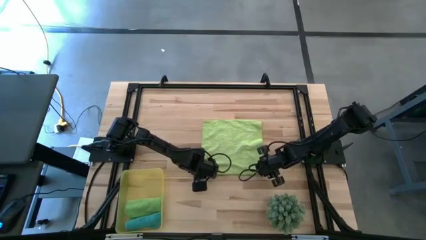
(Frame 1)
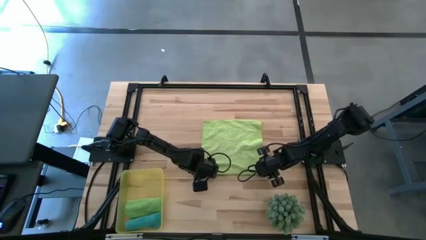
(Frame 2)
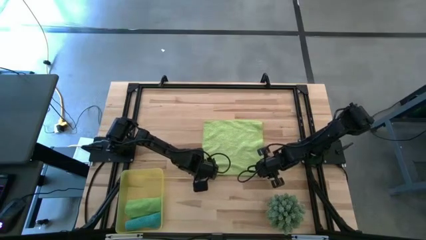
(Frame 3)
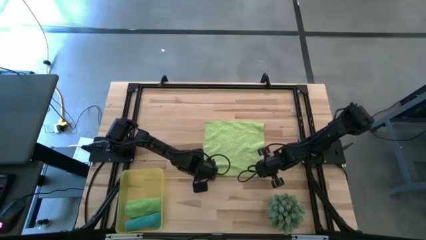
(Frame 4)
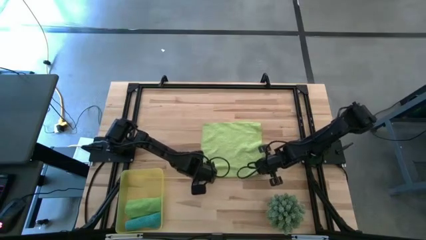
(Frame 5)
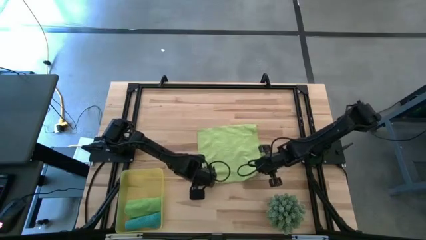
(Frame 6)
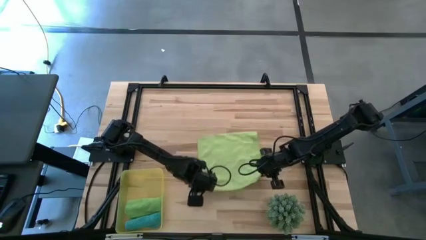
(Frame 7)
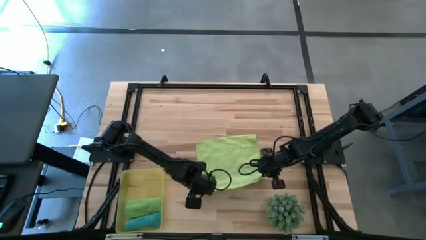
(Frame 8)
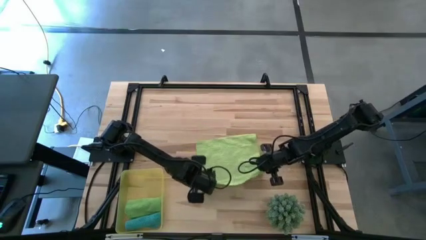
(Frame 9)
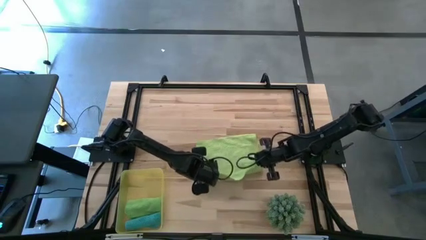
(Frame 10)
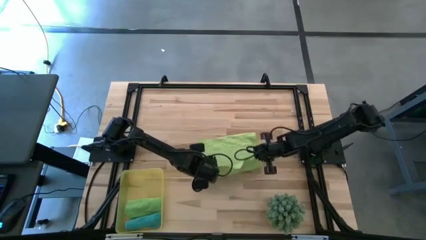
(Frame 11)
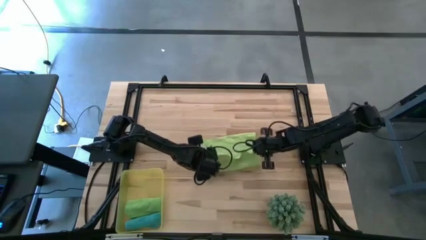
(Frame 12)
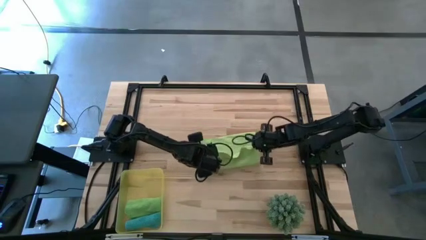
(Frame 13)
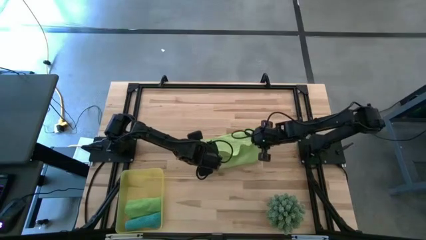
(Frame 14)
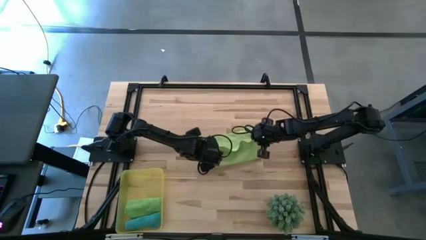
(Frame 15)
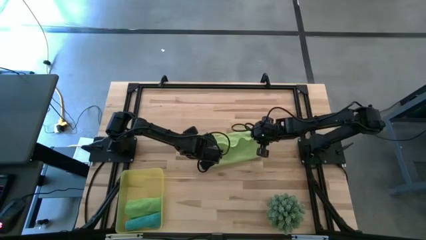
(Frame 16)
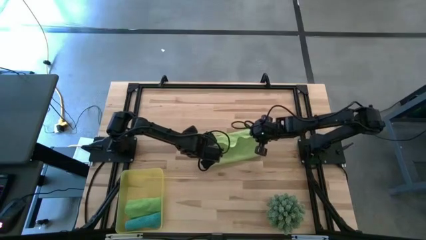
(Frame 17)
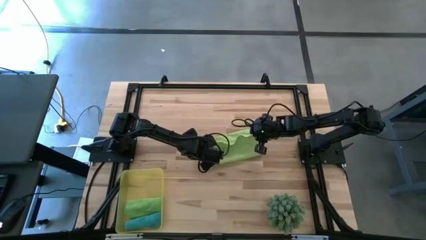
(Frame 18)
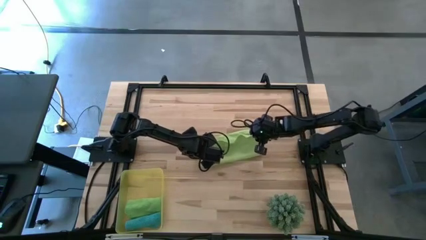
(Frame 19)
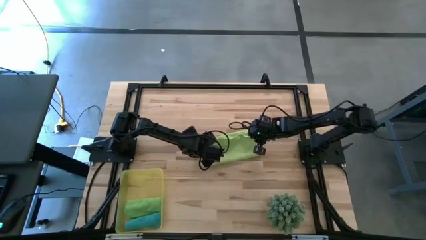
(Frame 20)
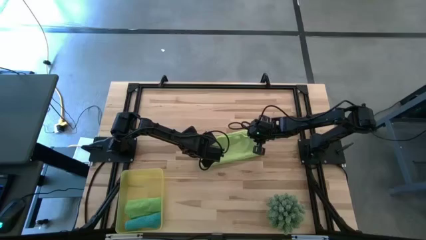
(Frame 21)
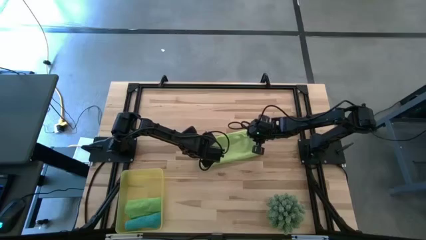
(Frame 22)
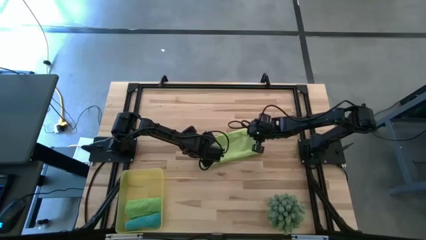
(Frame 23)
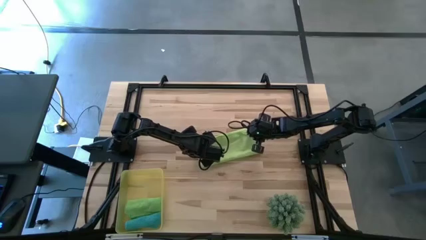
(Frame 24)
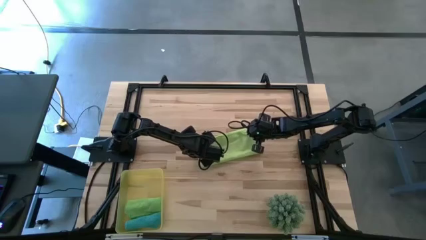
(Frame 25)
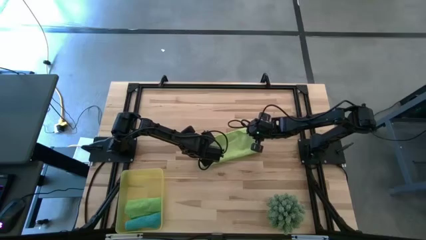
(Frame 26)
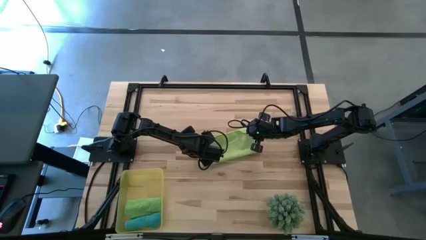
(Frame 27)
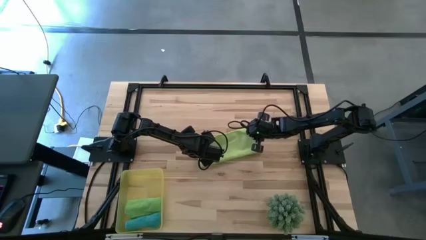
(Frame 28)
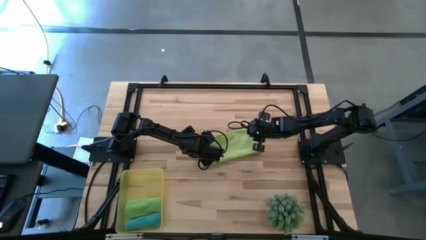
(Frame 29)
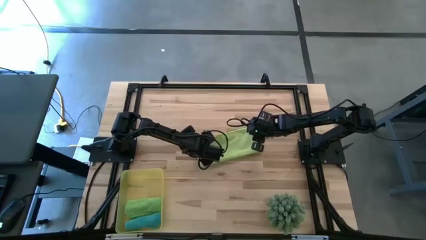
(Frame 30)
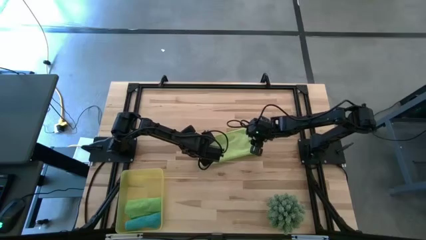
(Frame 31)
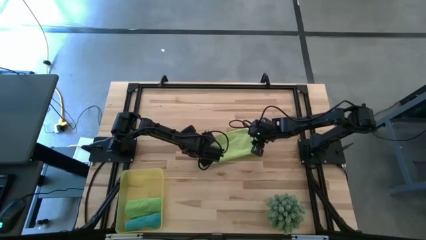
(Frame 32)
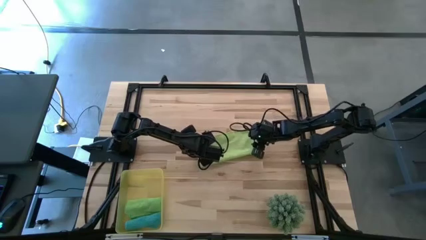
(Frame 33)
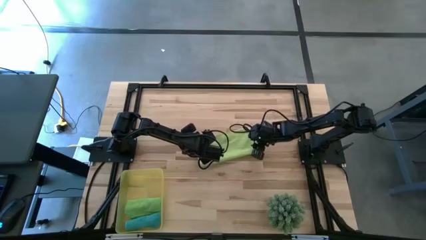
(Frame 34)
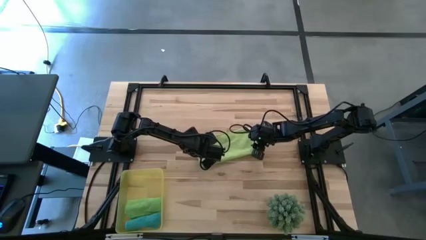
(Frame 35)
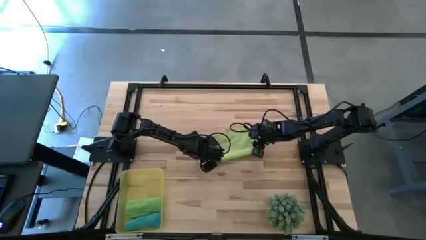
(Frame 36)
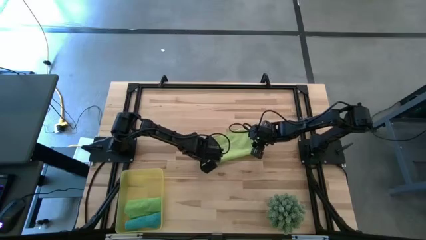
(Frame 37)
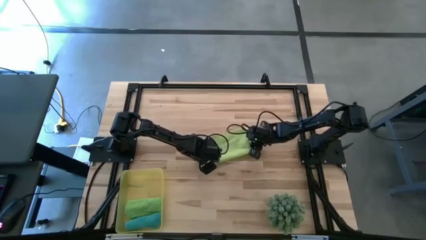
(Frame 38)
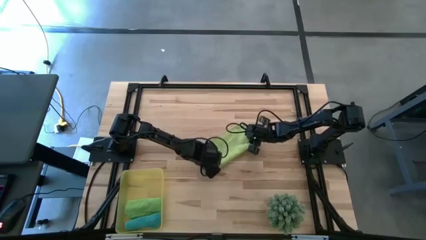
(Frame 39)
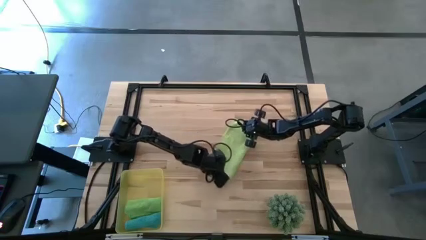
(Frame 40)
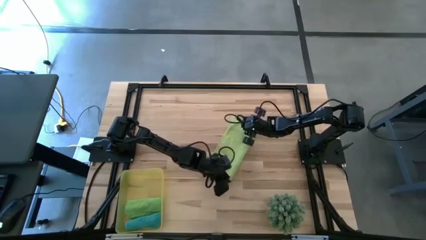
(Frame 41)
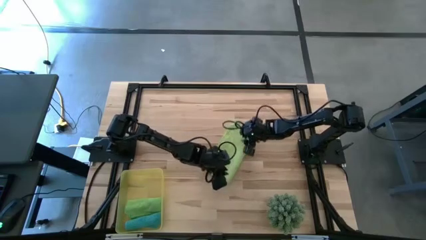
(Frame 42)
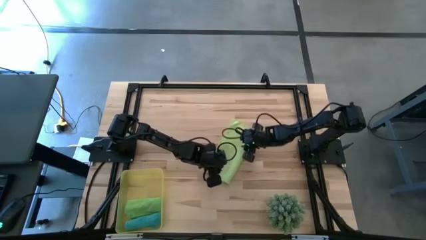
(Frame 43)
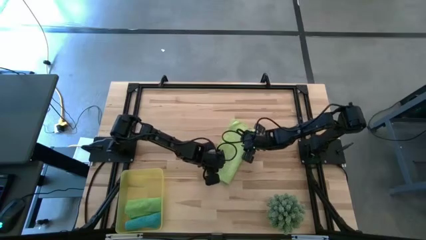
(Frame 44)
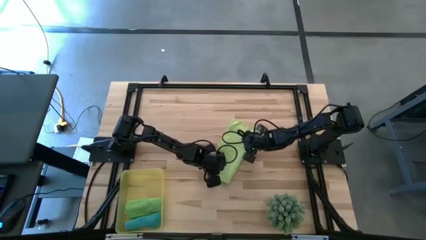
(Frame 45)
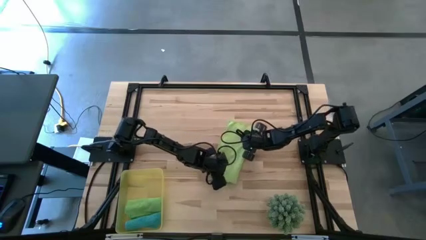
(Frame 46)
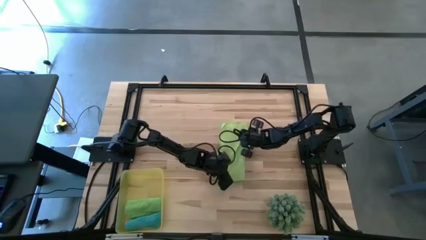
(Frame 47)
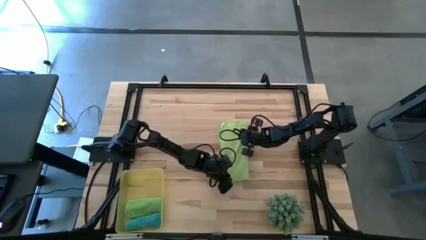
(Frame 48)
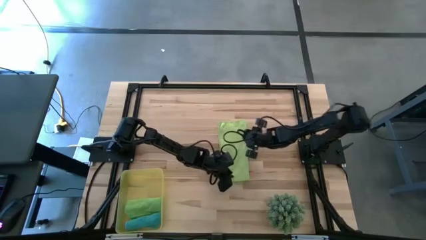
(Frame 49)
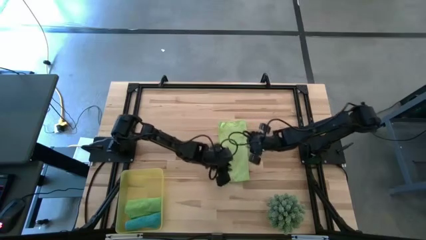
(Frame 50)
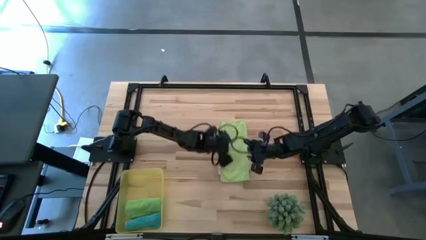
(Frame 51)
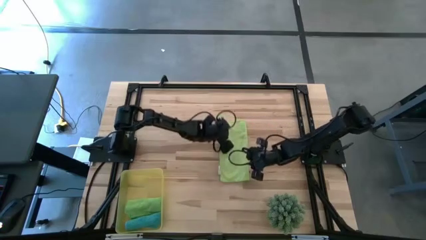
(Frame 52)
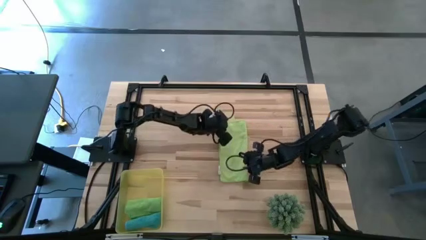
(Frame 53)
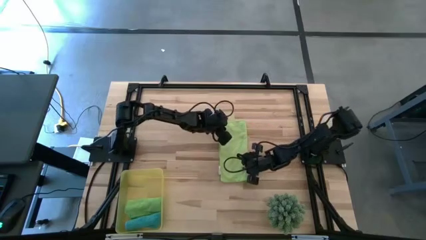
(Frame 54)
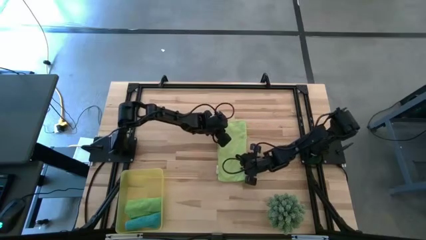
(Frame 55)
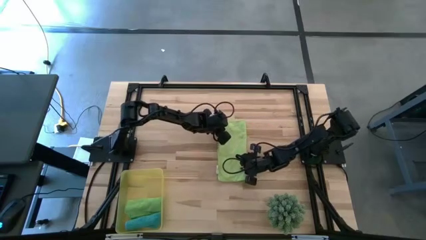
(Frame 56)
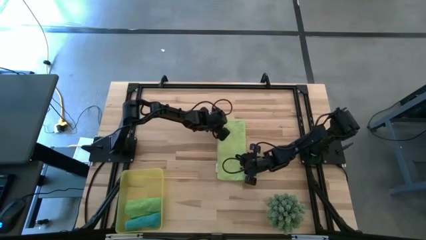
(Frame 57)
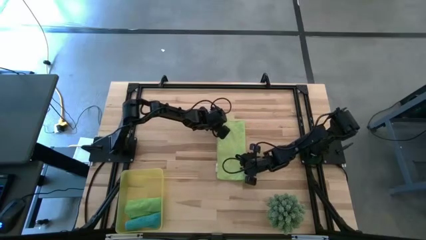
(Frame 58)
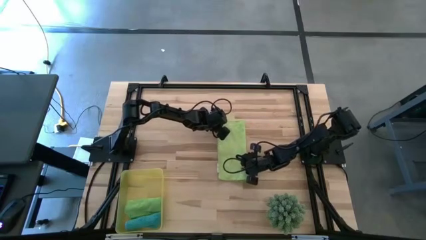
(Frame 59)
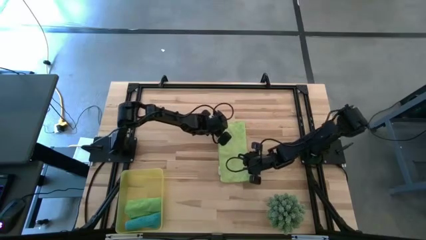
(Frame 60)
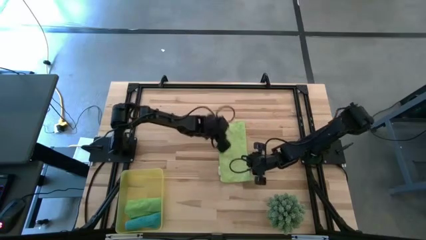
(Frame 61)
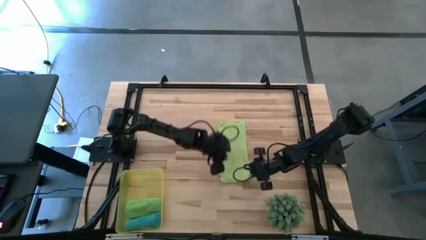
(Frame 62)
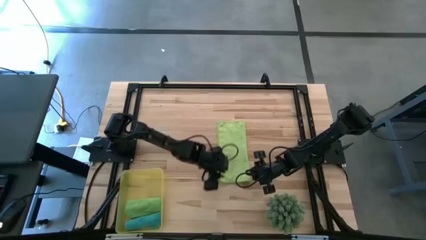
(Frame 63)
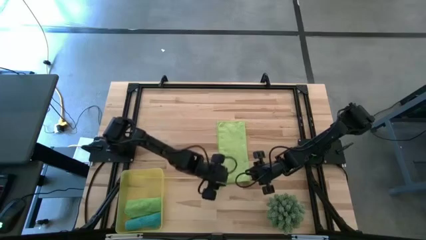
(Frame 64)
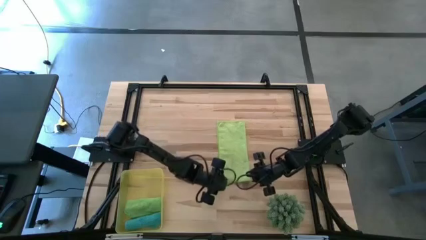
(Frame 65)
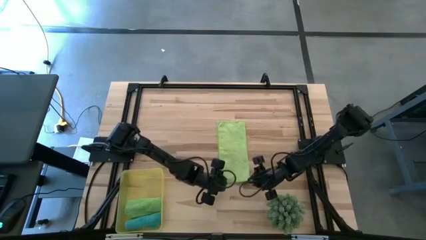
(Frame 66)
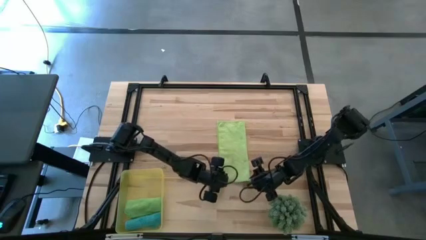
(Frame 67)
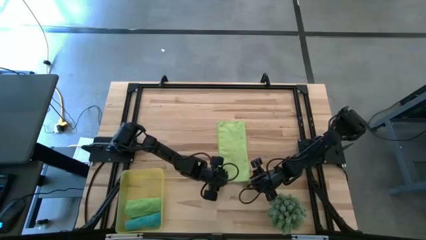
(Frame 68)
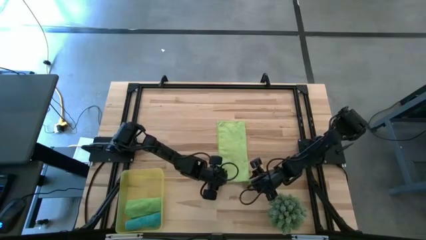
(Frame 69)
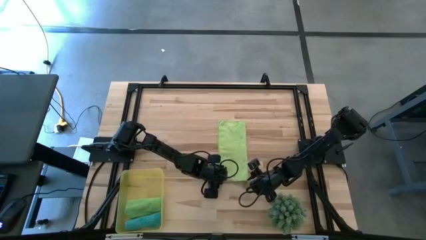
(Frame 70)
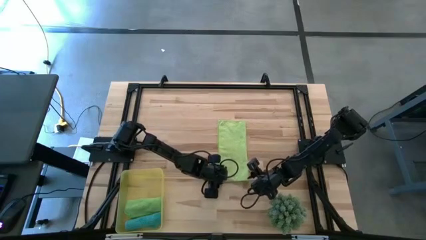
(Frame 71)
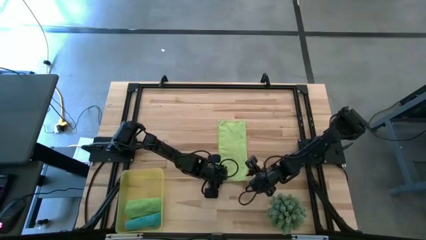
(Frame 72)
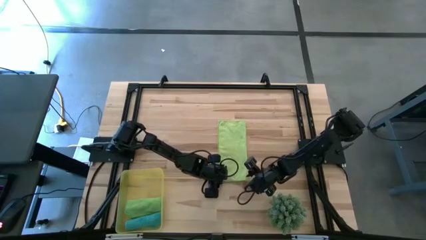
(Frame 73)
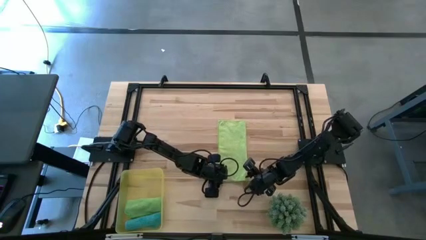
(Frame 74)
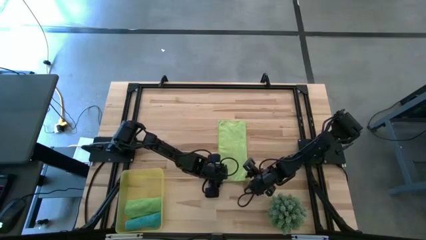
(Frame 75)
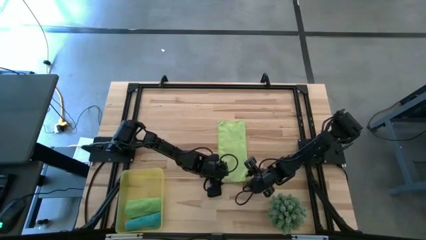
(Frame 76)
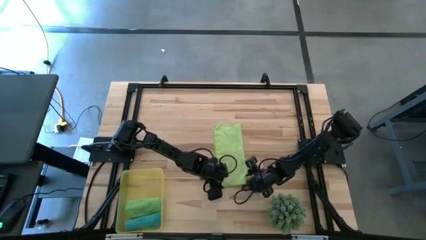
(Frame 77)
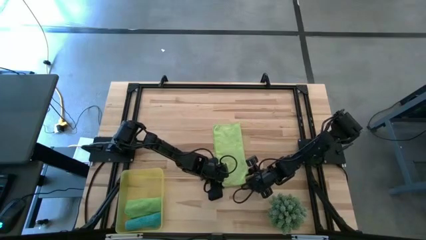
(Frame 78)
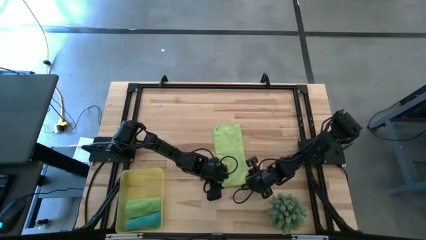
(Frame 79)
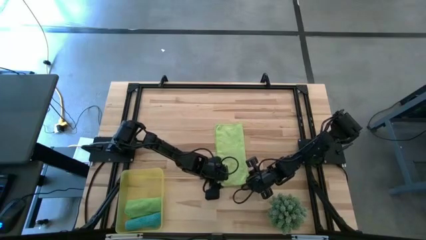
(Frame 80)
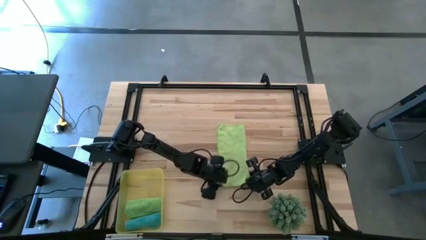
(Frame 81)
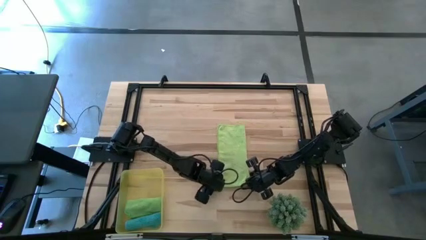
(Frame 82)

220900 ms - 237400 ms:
Task: Roll microfiber towels into tight, uniform cylinder then place into a basket
Roll the light green microfiber towel
